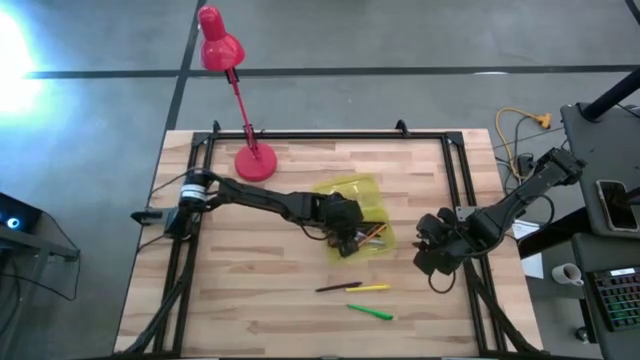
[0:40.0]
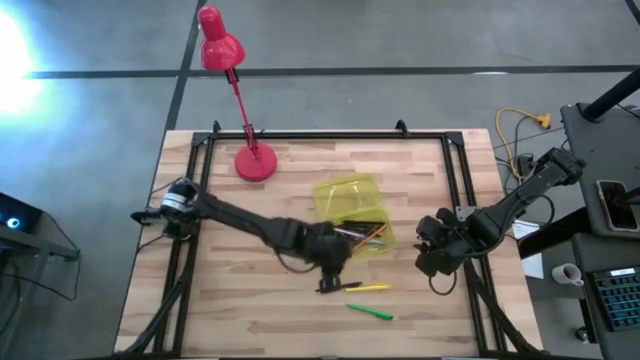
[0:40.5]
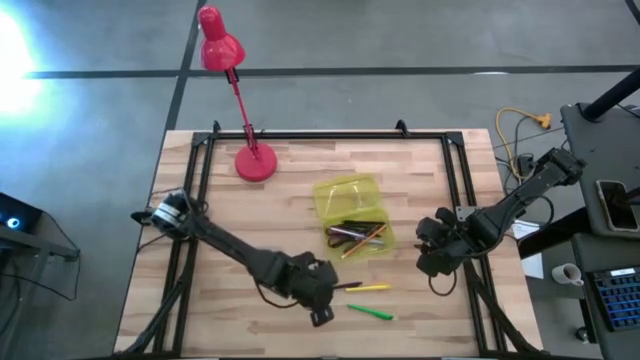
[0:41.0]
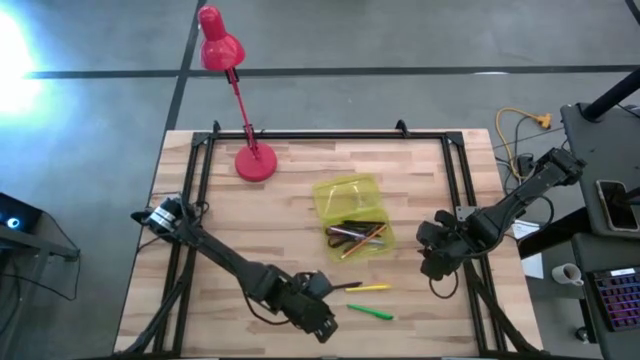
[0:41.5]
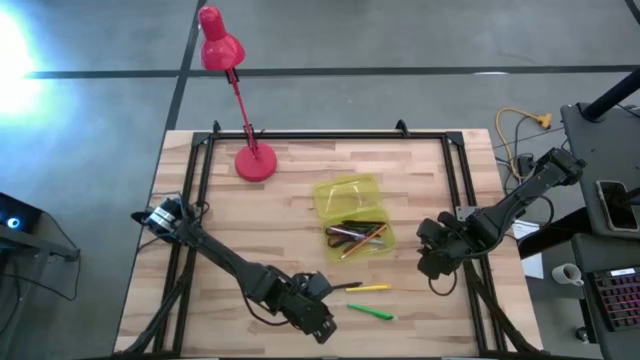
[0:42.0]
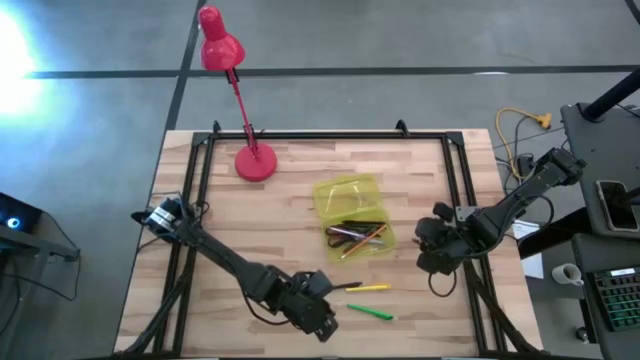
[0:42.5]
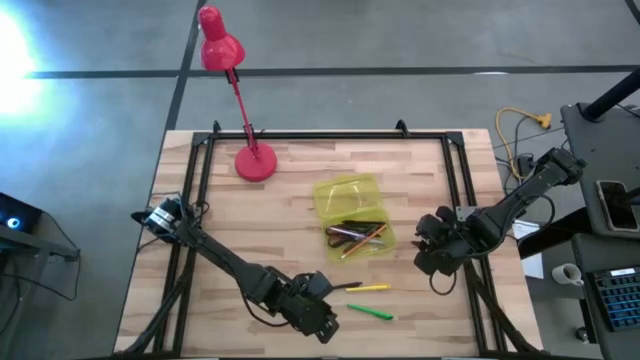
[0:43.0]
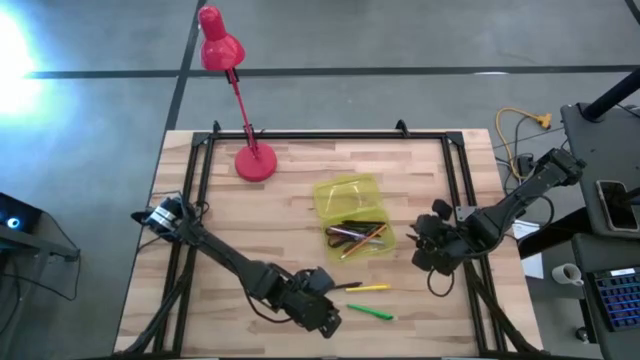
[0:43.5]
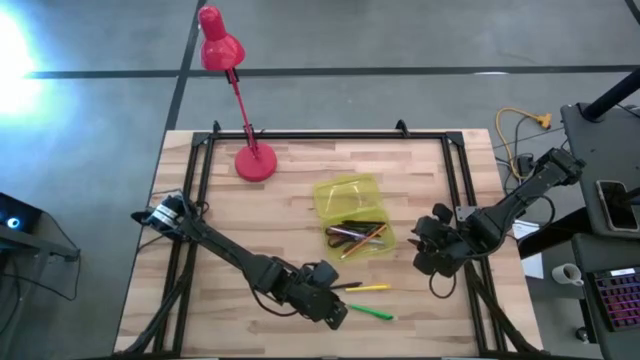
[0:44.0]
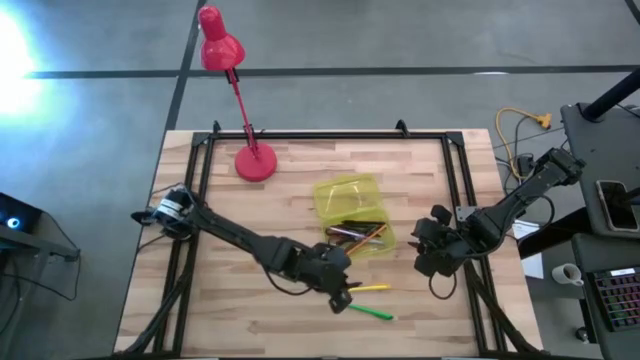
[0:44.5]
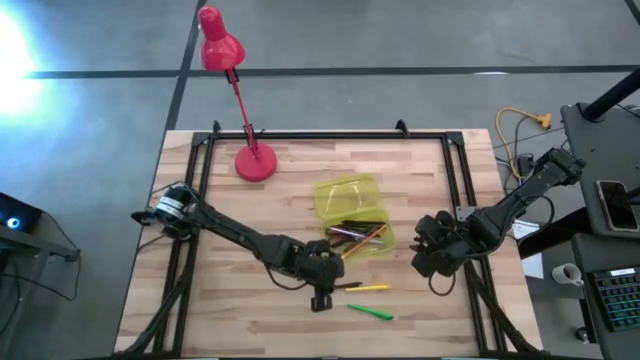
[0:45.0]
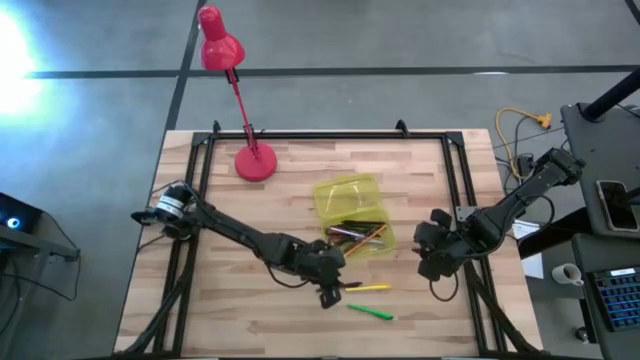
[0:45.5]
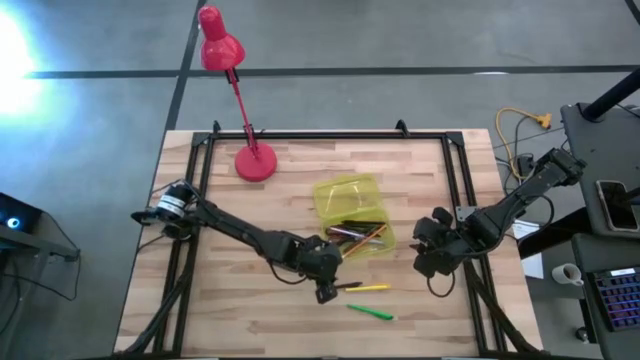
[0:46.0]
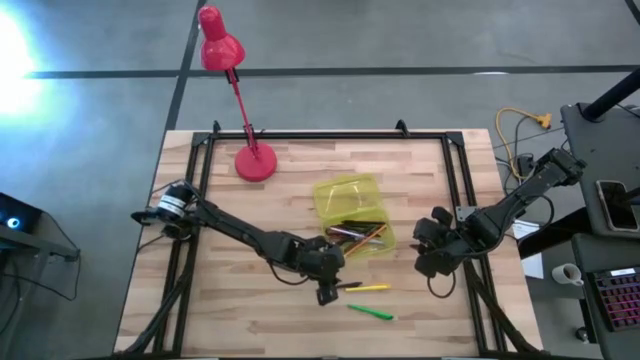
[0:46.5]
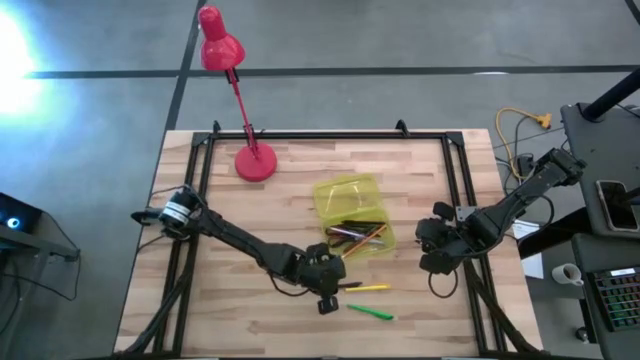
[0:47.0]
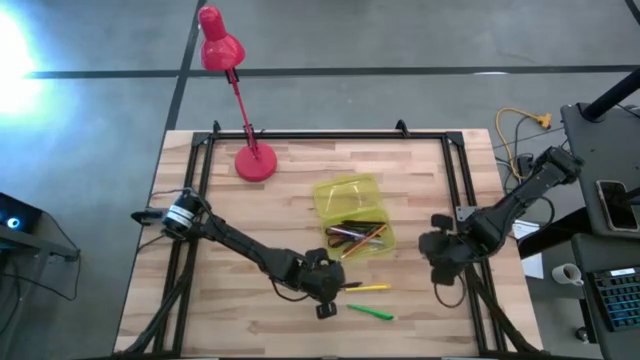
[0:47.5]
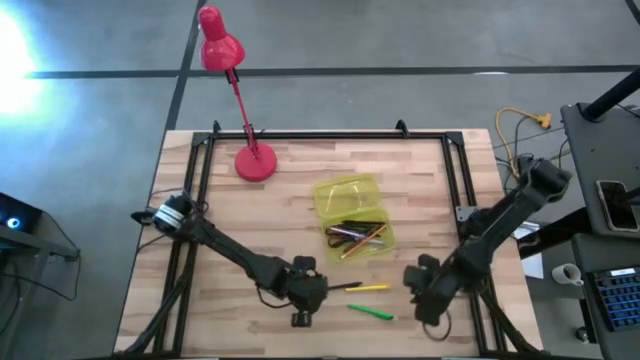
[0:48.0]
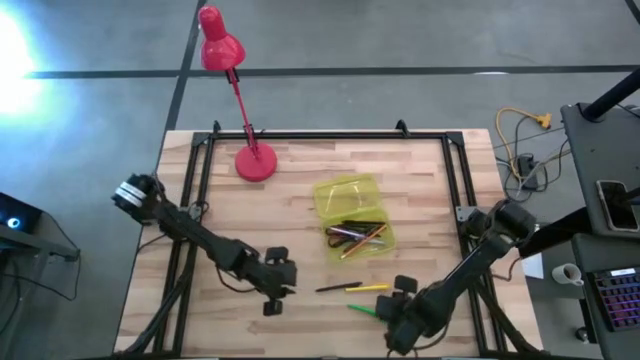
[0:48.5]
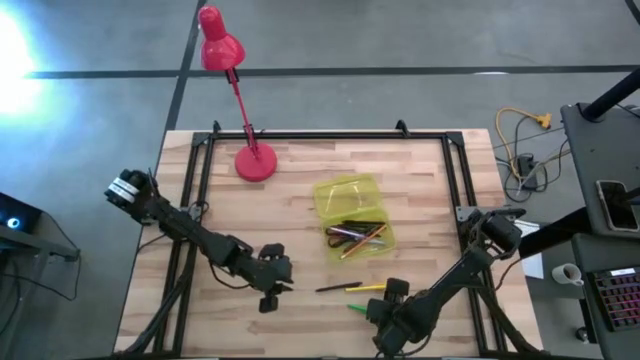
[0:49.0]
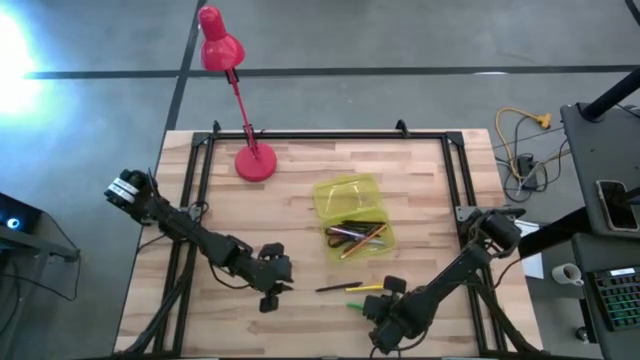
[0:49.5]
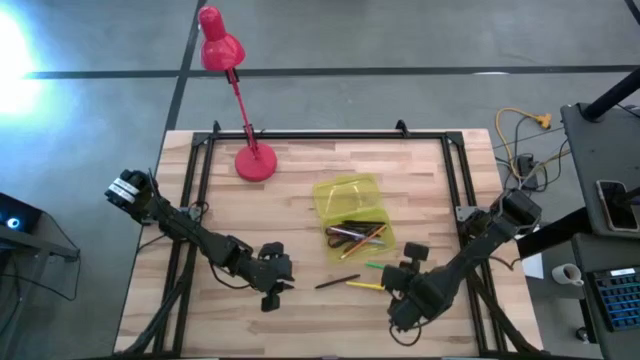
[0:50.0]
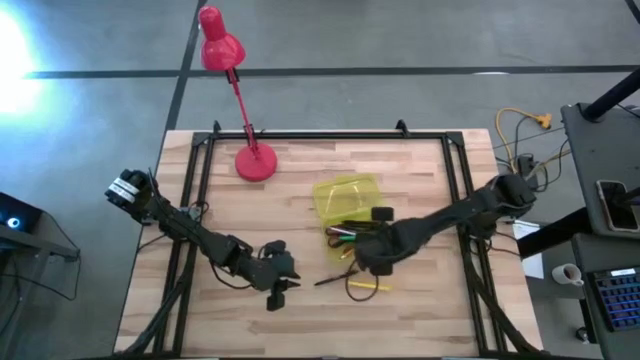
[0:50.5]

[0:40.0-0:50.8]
Task: Pick & place school supplies into a supply box
Put the green pen into the yellow supply box

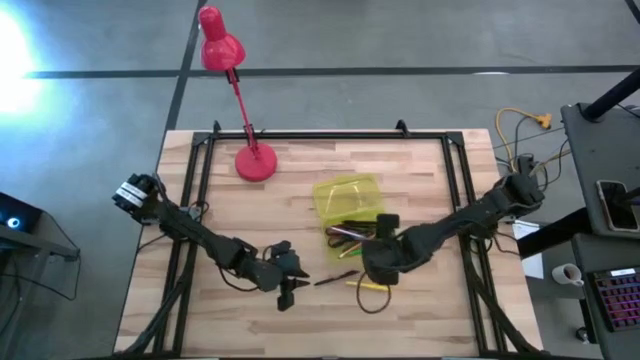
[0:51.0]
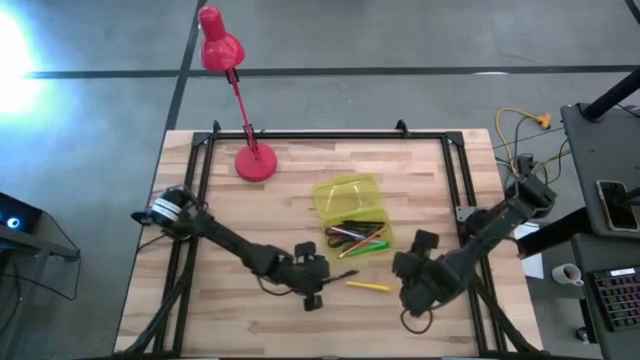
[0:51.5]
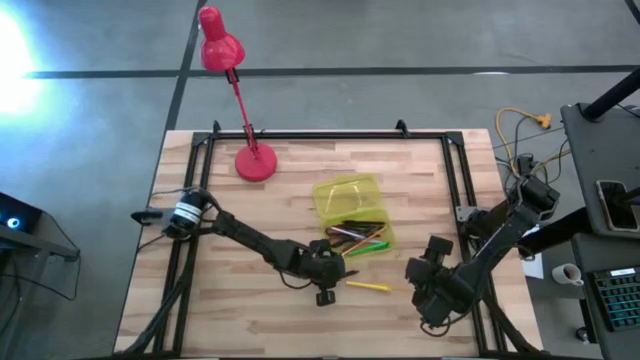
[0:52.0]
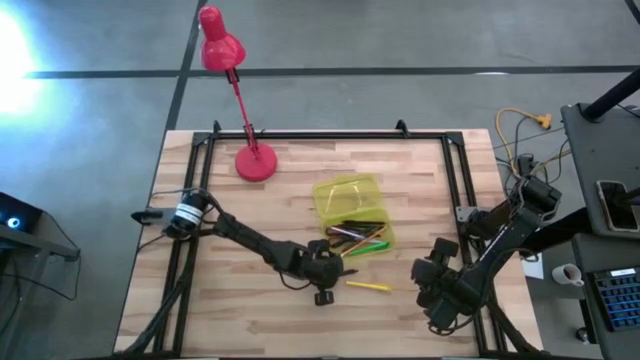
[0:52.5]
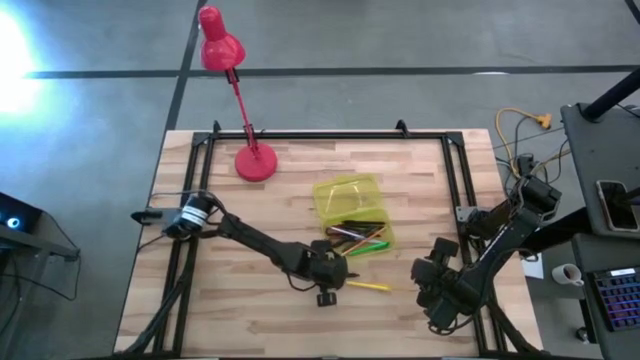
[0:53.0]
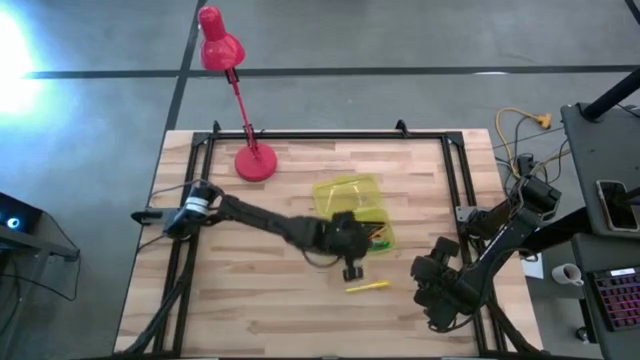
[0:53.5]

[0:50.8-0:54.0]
Put the black pen into the yellow supply box

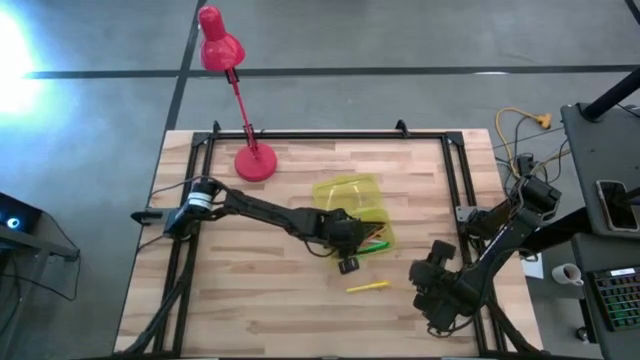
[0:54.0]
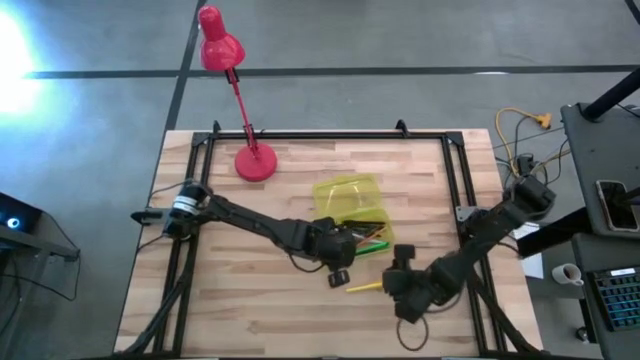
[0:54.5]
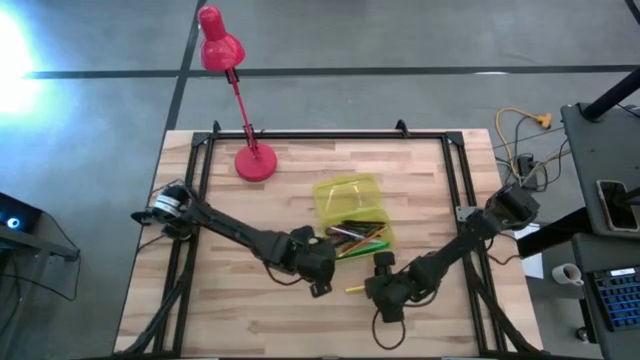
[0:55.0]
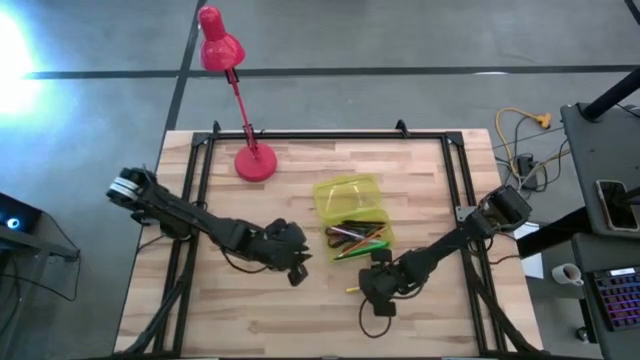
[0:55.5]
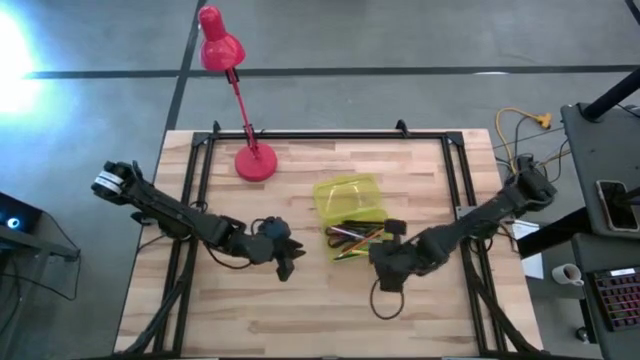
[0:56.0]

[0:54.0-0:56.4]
Put the yellow pen into the yellow supply box

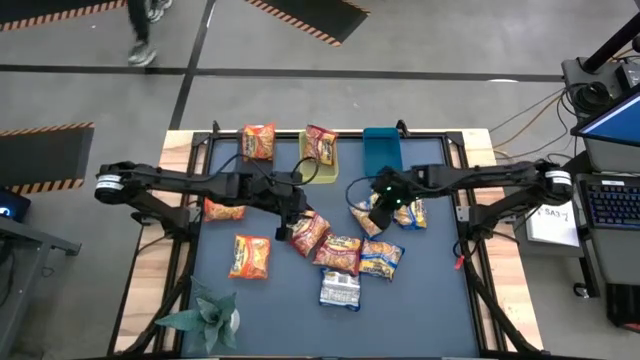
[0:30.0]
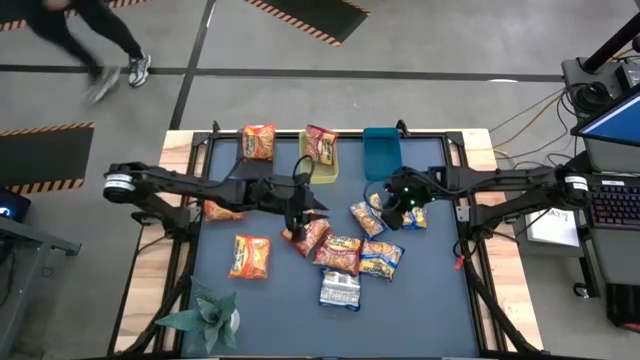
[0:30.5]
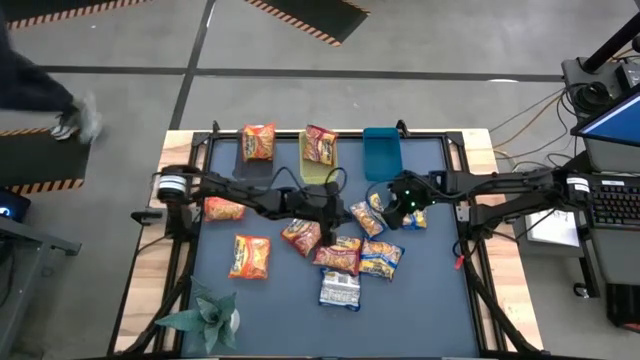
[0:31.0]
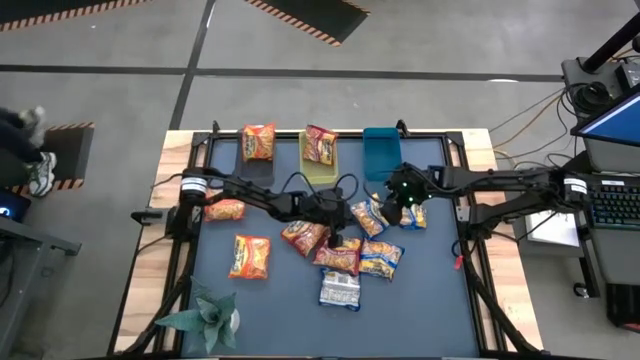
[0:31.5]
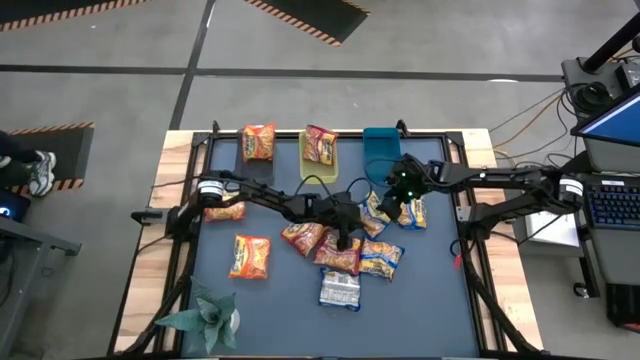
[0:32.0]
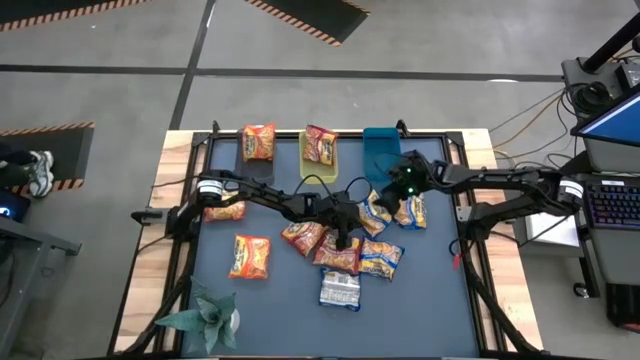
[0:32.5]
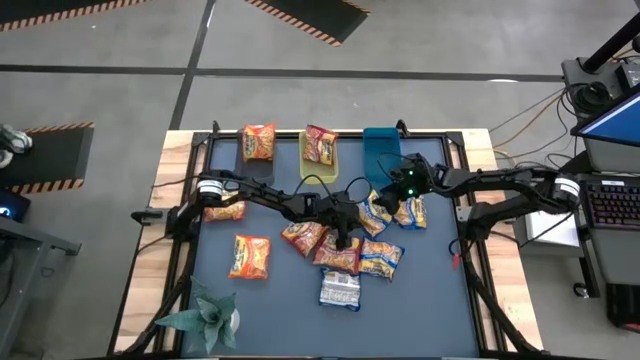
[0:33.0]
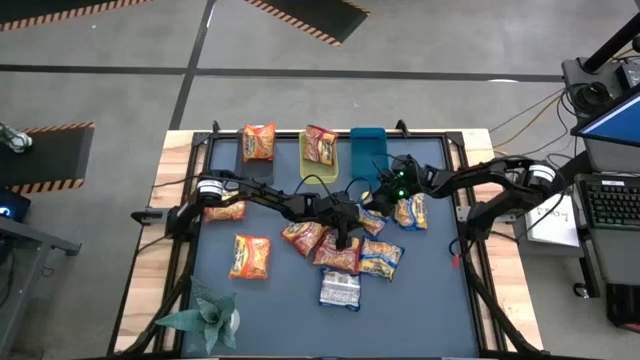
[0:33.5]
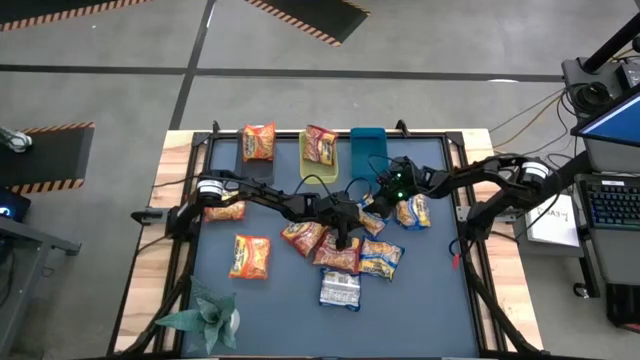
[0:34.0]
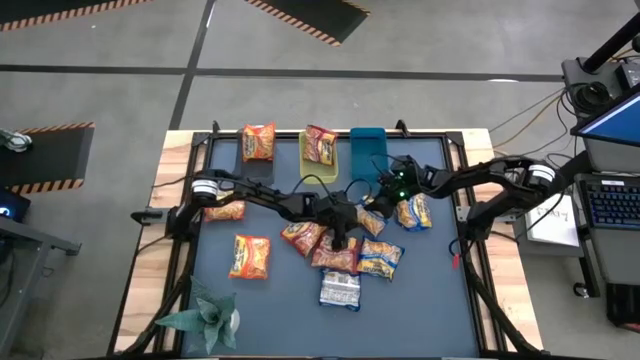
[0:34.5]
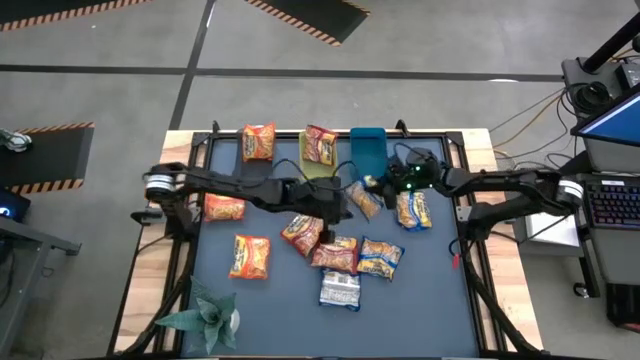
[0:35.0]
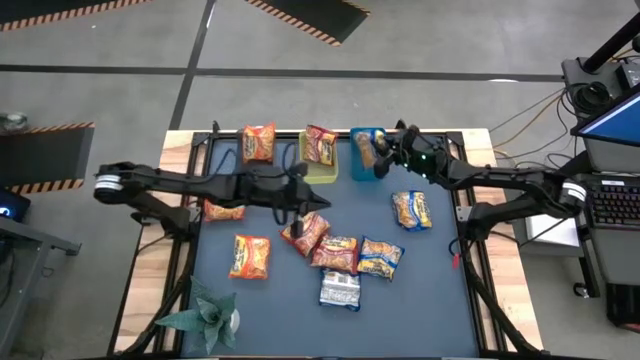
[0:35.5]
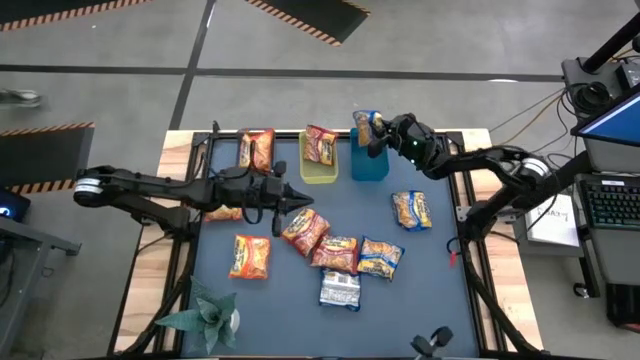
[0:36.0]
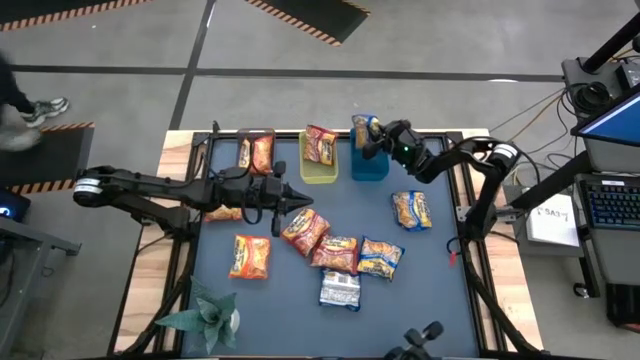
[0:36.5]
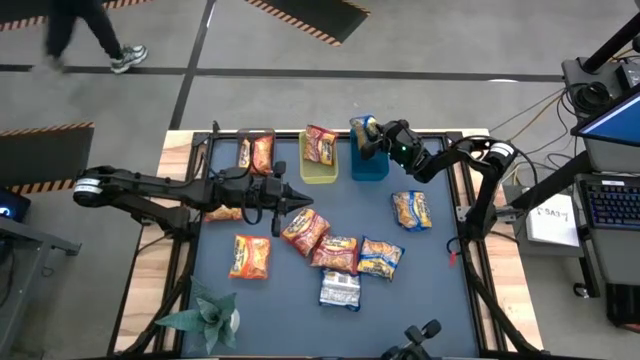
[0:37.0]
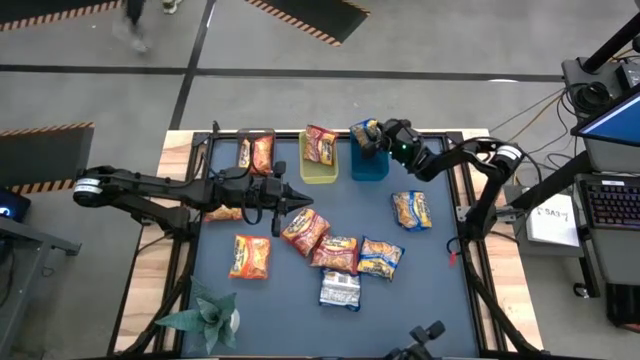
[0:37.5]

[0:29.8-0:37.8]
Task: Sort Maruchan noodles
Put the blue noodle pack into the blue bin
